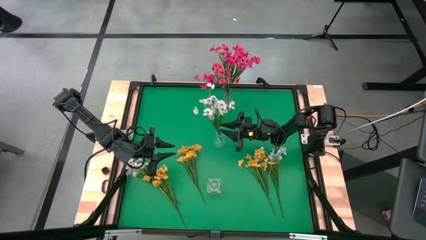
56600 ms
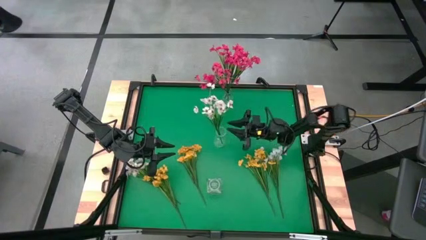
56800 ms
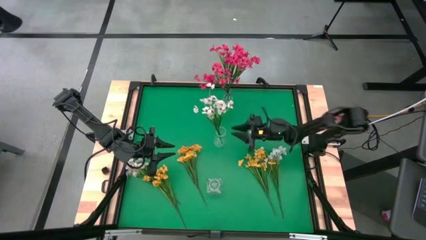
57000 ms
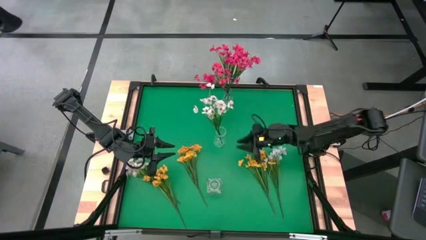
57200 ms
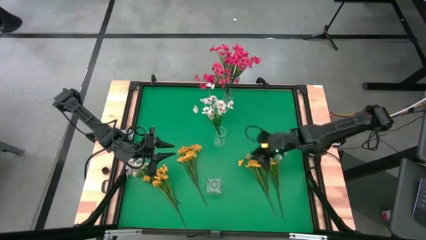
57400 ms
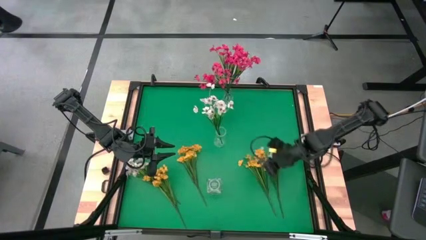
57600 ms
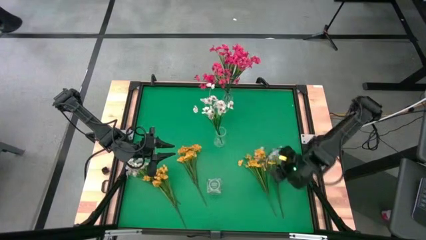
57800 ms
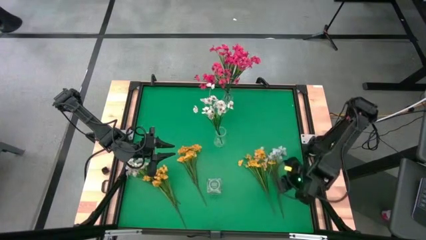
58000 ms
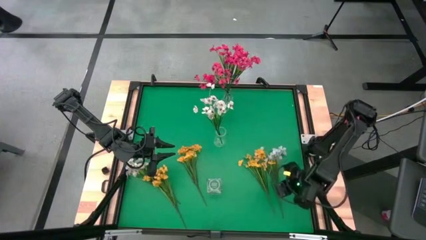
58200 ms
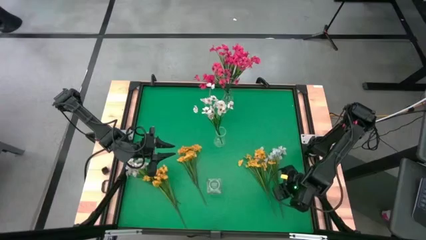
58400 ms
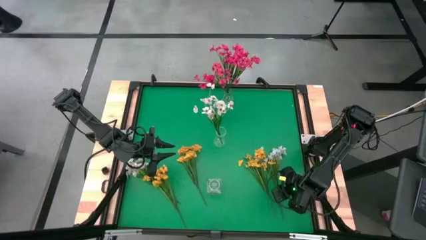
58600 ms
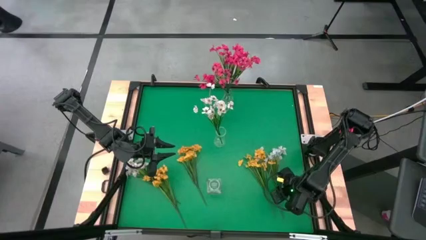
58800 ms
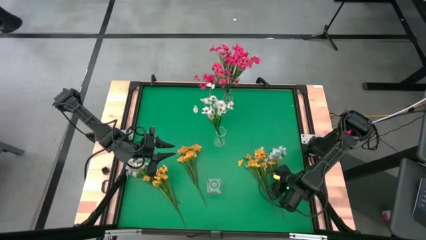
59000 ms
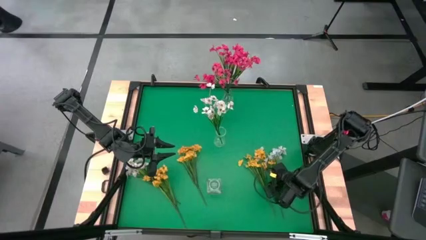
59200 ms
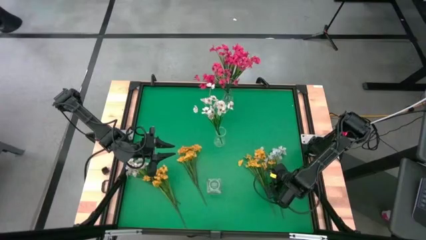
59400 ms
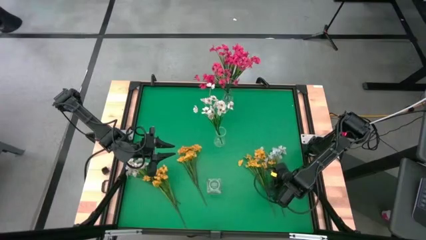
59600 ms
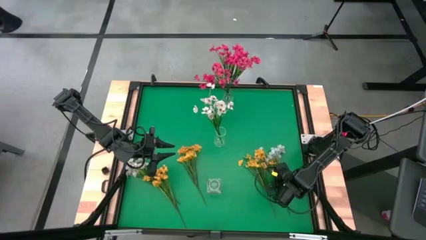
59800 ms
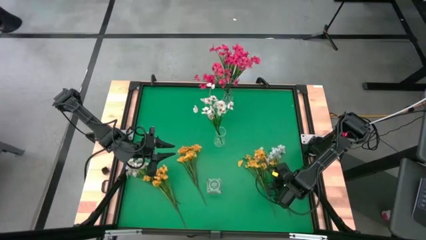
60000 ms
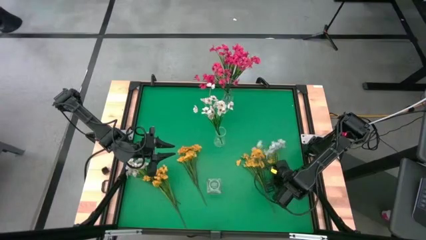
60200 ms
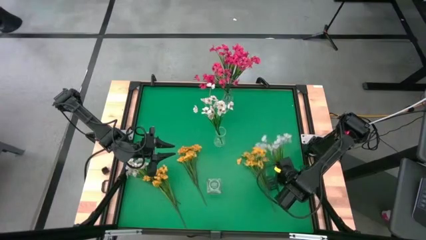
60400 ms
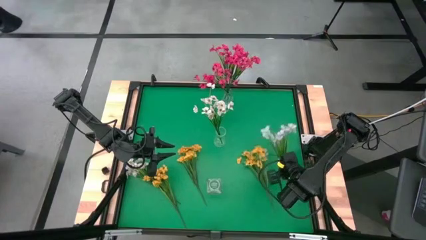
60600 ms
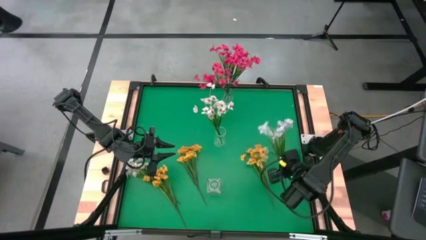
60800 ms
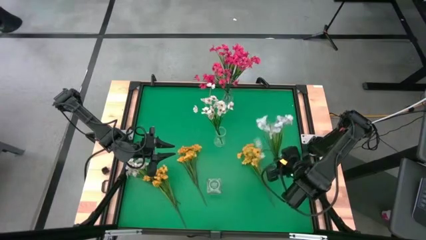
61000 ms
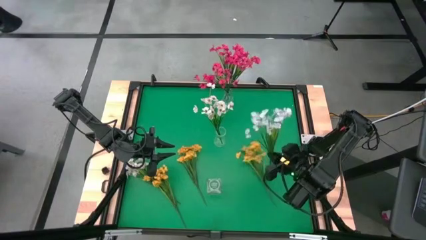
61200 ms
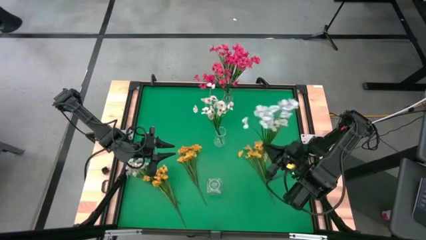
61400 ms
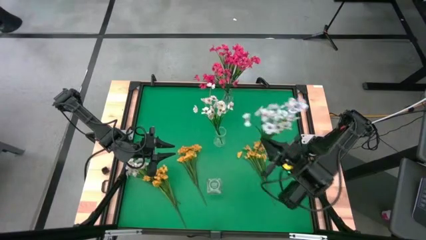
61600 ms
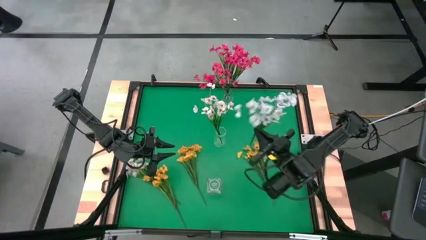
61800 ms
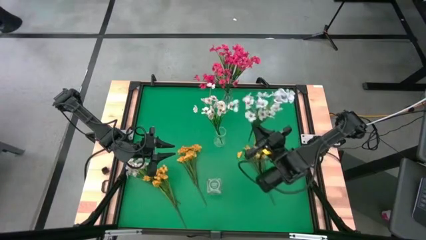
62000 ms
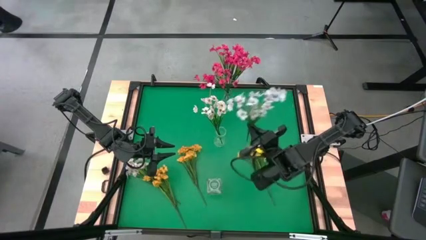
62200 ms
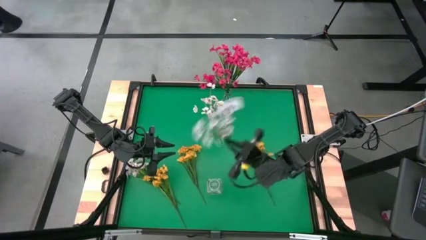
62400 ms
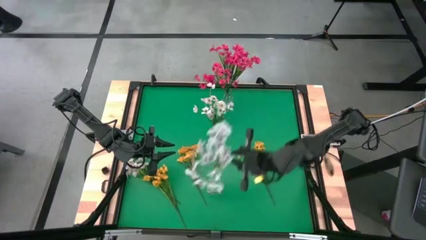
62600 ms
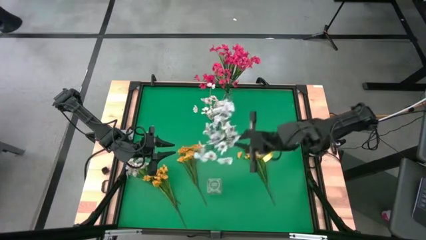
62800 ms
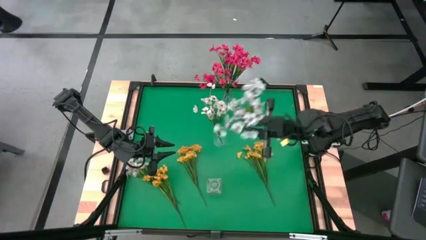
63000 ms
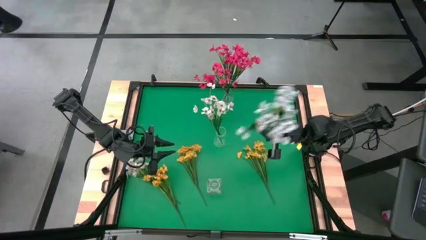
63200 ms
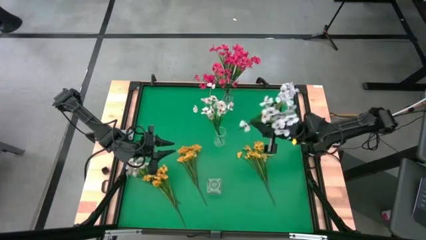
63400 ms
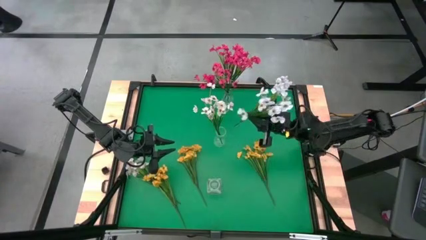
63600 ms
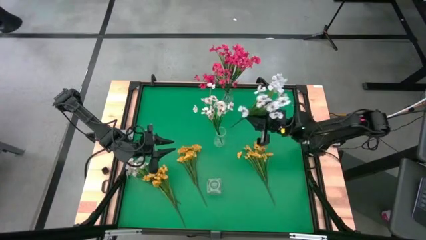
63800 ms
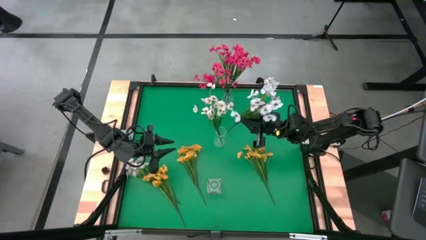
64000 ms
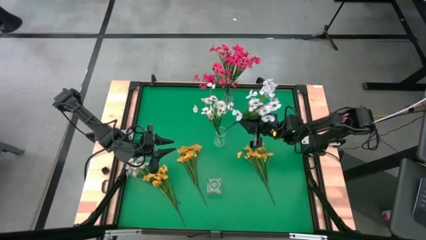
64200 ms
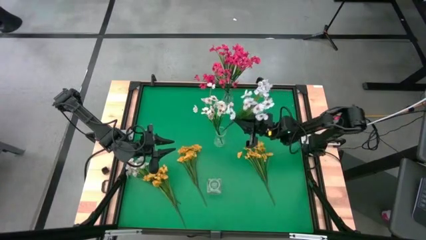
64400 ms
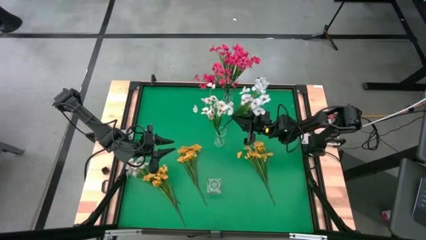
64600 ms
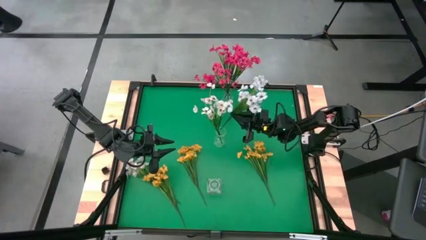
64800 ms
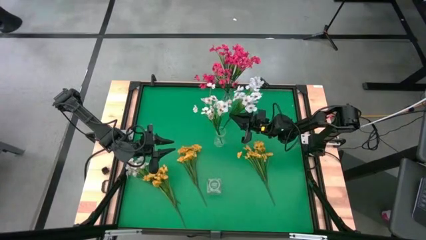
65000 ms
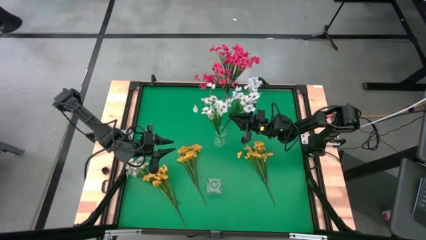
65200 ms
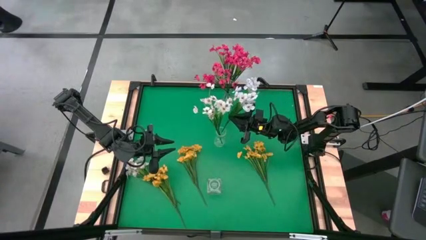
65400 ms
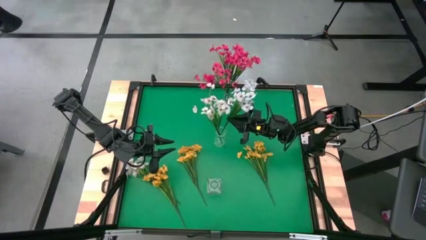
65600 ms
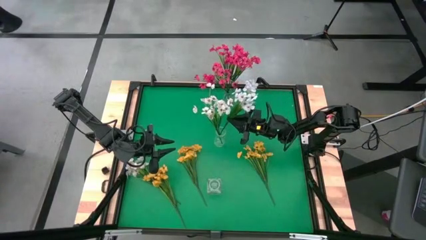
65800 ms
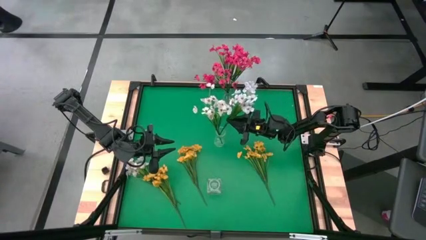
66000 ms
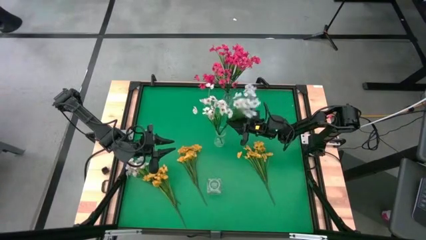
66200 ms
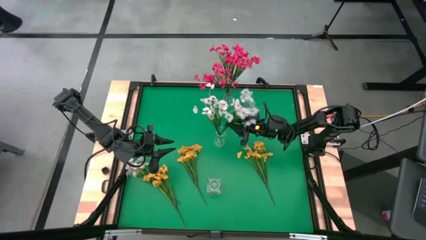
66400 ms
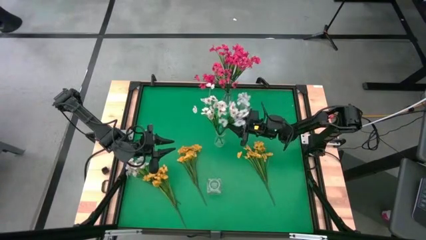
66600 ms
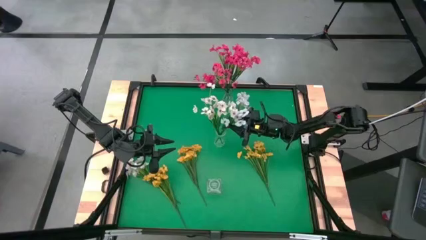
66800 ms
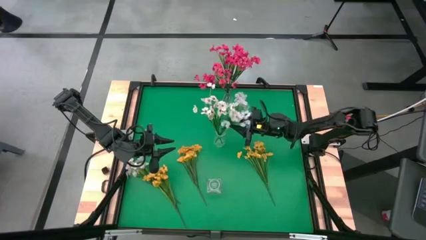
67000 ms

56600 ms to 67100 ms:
Task: Sort flowers into vase by color
Put the right white flowers into the middle transparent vase

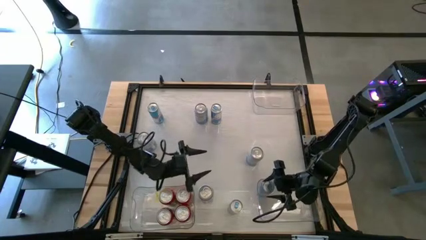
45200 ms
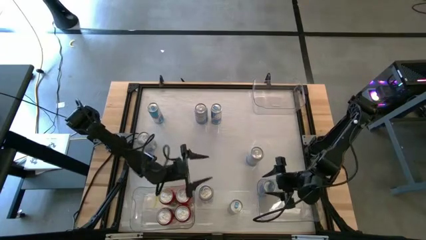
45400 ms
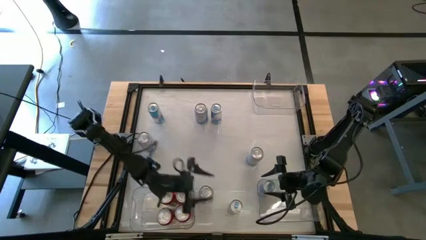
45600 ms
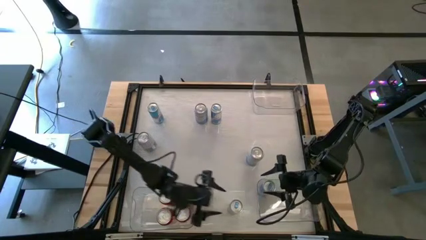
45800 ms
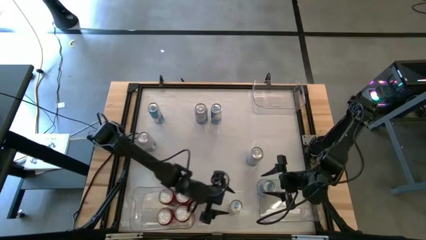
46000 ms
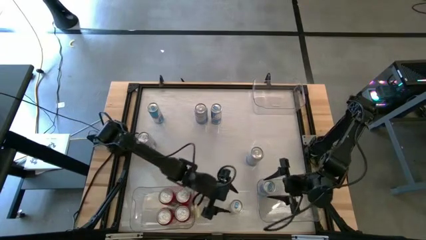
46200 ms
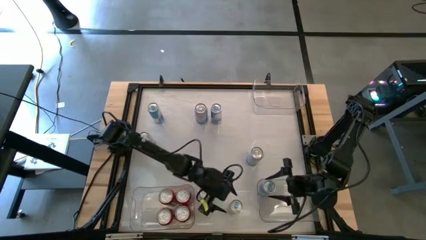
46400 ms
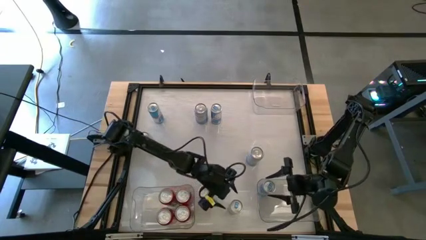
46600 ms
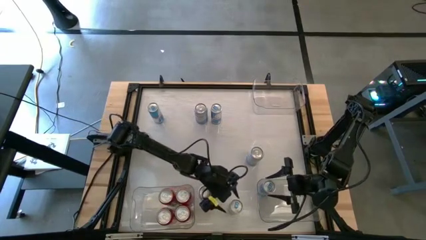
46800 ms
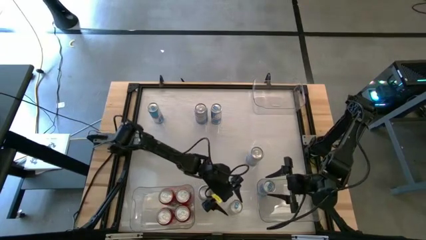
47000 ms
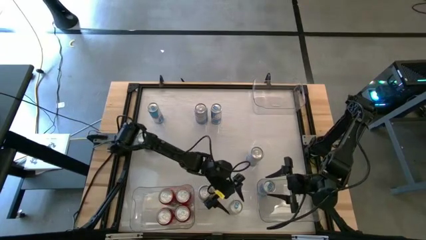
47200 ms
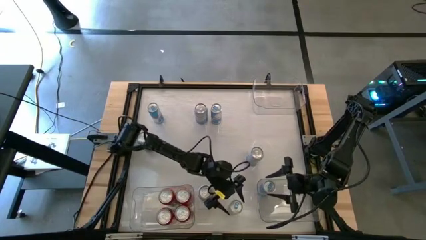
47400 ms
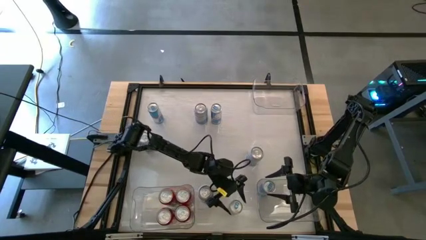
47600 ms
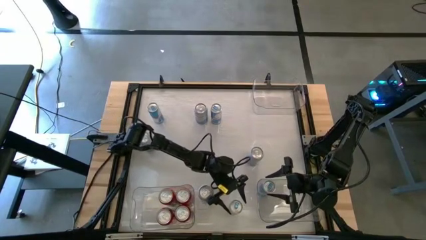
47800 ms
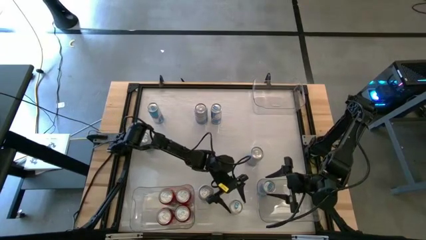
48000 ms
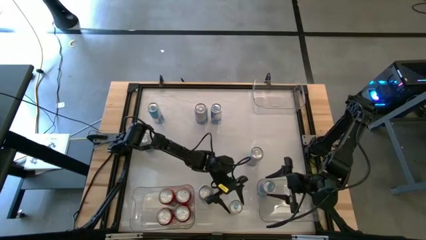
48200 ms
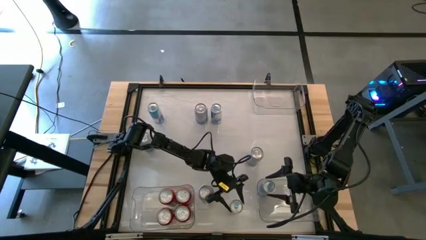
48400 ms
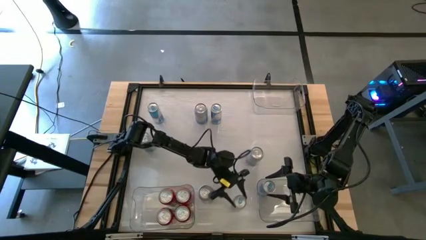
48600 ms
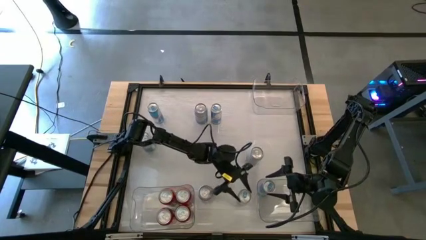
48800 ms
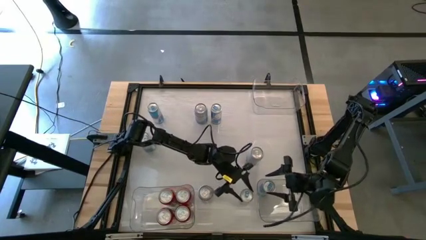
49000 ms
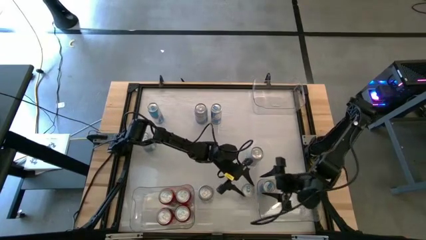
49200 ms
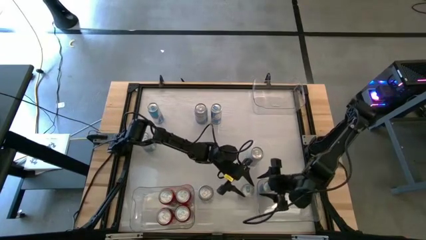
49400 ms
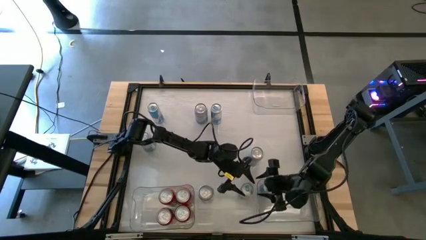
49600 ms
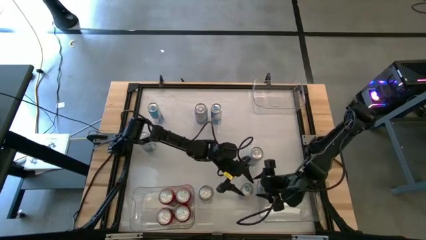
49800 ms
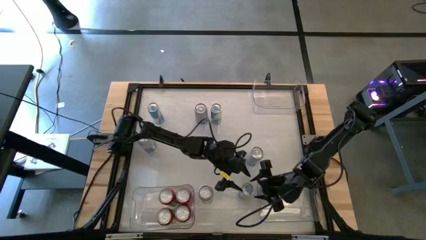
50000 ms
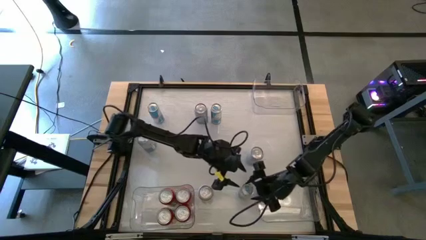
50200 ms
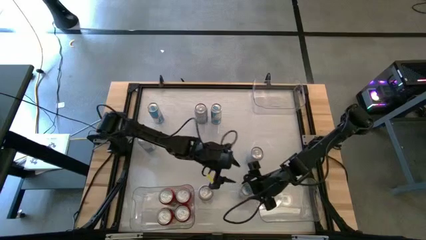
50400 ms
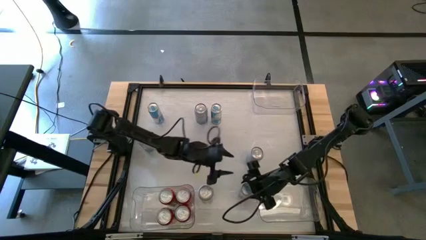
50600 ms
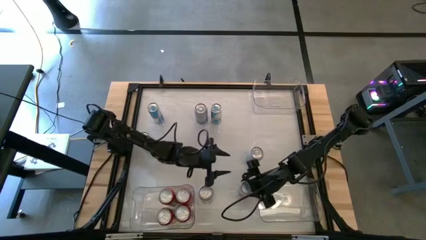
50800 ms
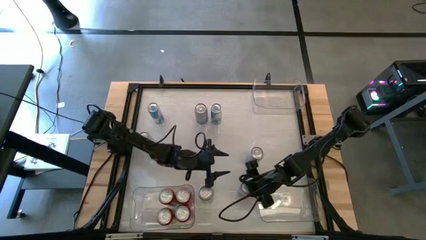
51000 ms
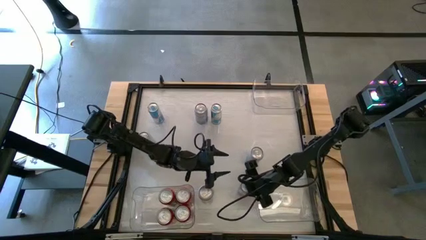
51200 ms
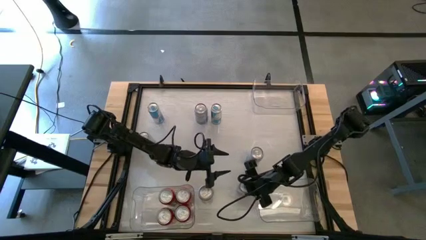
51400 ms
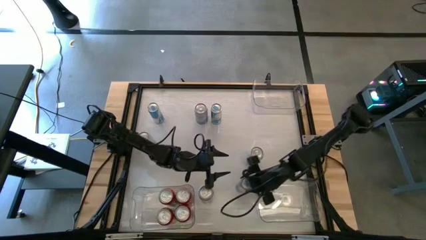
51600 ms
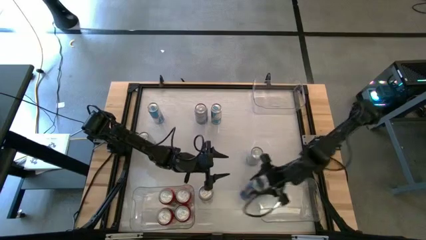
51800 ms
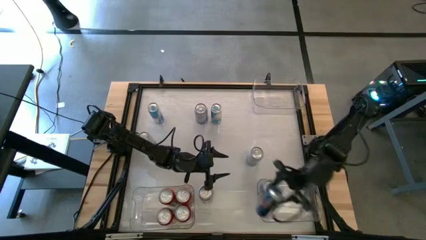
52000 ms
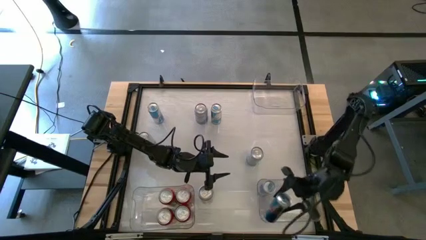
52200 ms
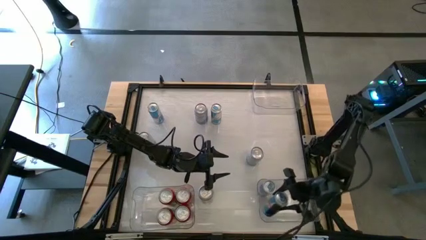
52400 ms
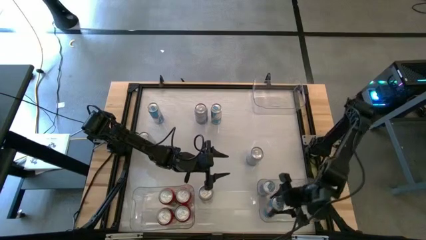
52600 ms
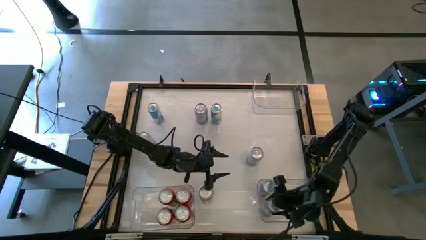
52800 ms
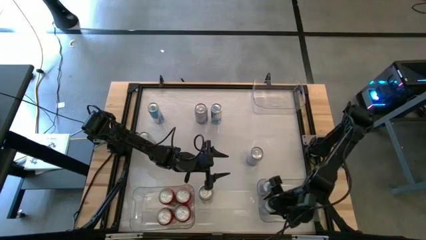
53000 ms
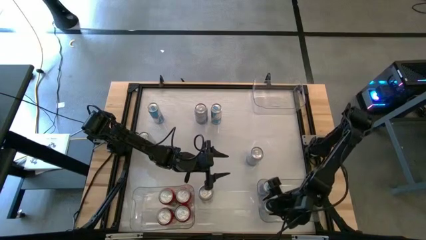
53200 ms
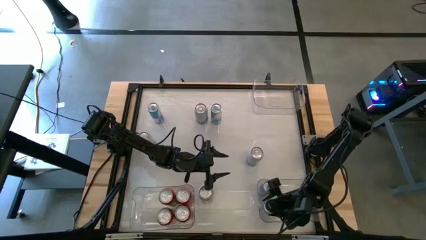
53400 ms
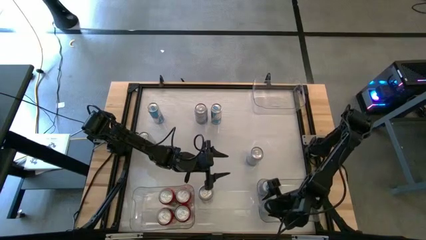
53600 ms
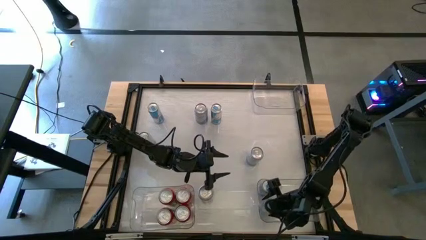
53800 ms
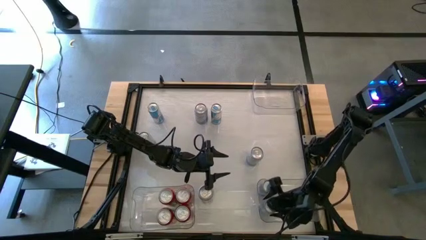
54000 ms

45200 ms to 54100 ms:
Task: Sort soda cans
Put the bottom right blue soda can into the bottom right transparent bin
